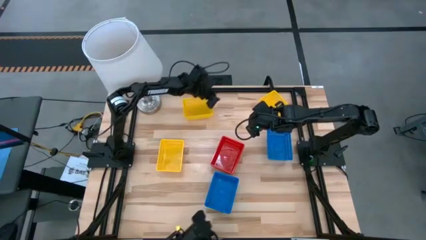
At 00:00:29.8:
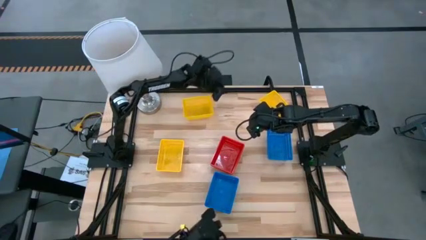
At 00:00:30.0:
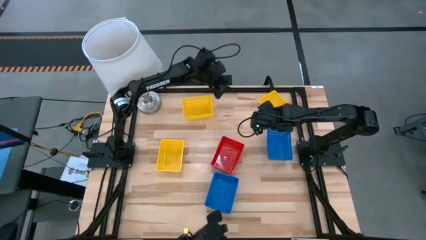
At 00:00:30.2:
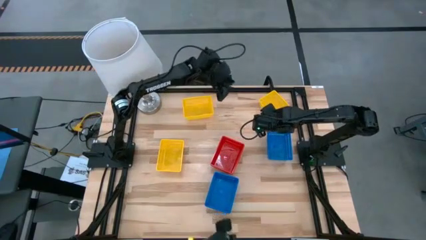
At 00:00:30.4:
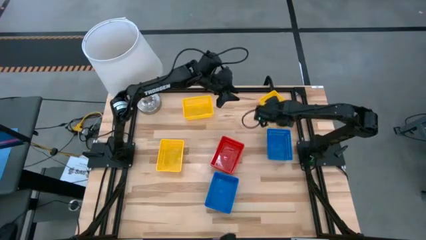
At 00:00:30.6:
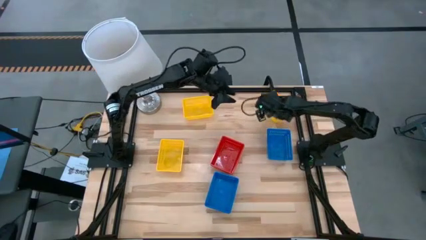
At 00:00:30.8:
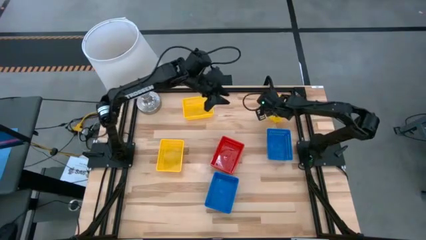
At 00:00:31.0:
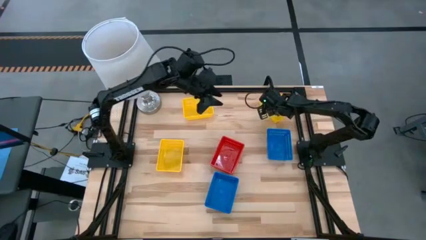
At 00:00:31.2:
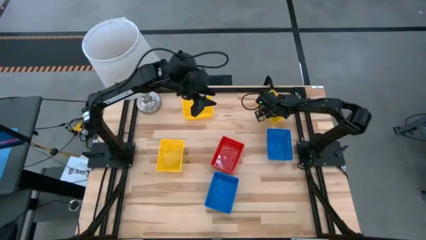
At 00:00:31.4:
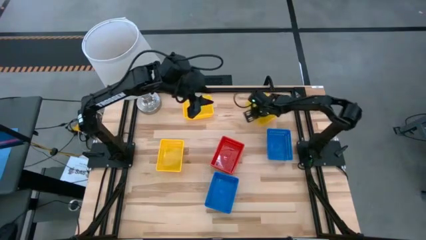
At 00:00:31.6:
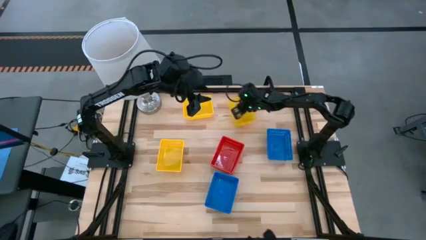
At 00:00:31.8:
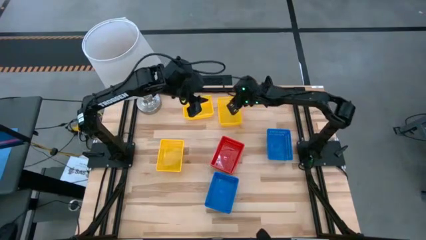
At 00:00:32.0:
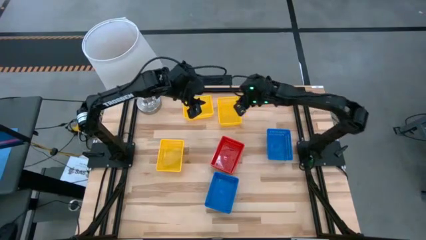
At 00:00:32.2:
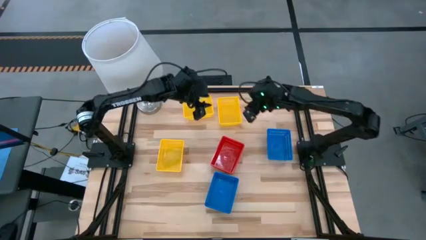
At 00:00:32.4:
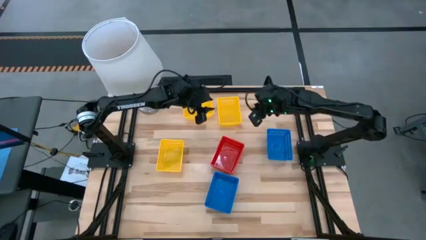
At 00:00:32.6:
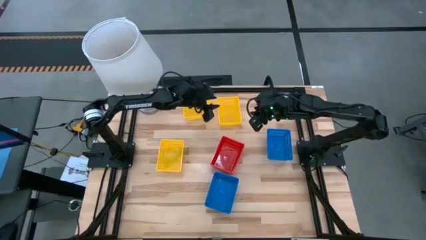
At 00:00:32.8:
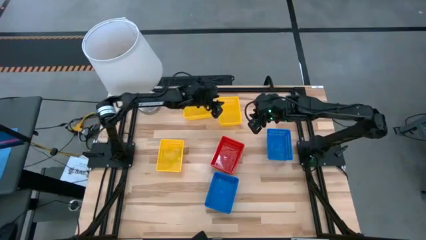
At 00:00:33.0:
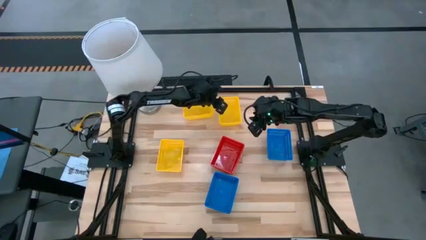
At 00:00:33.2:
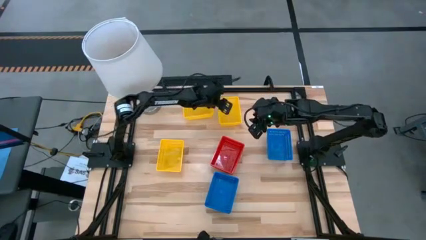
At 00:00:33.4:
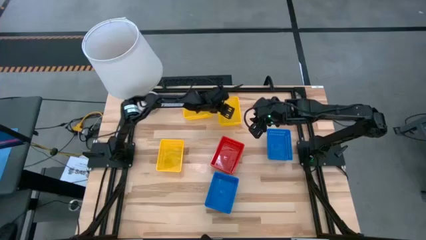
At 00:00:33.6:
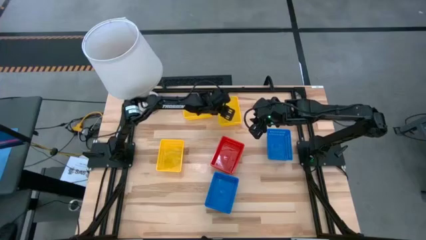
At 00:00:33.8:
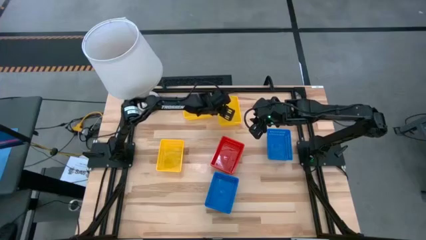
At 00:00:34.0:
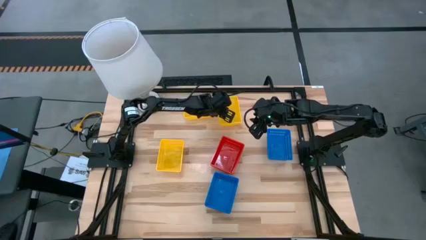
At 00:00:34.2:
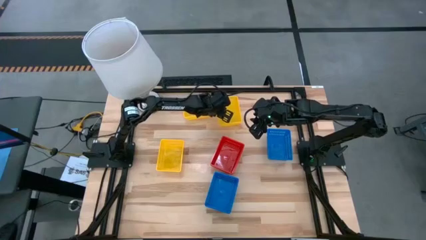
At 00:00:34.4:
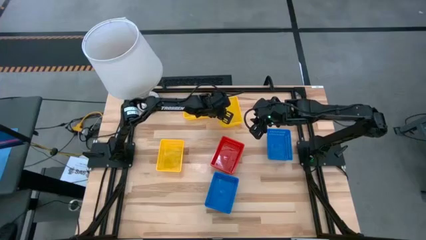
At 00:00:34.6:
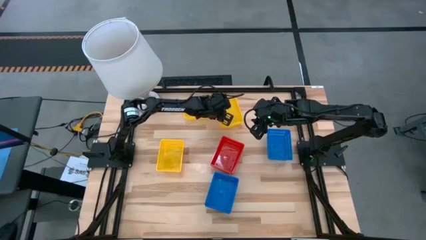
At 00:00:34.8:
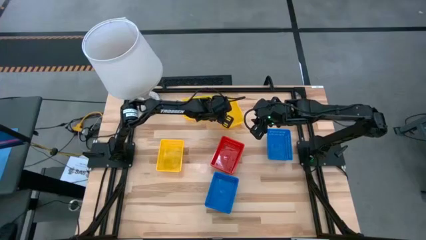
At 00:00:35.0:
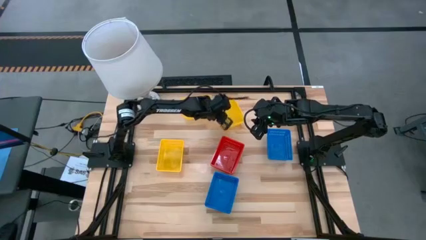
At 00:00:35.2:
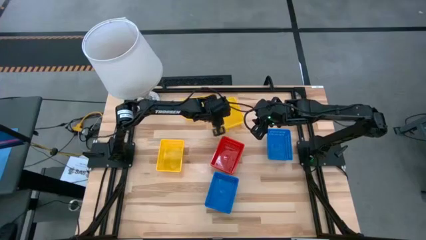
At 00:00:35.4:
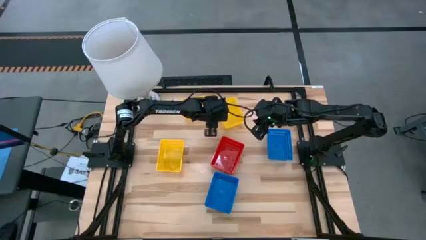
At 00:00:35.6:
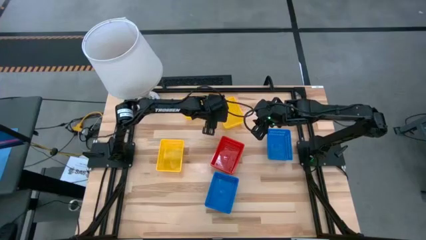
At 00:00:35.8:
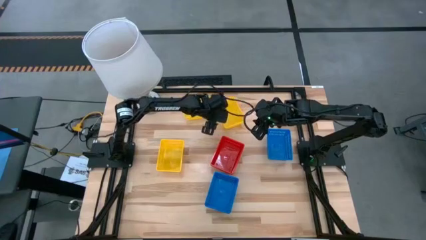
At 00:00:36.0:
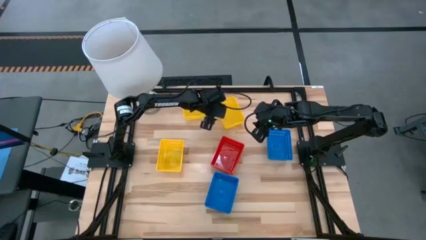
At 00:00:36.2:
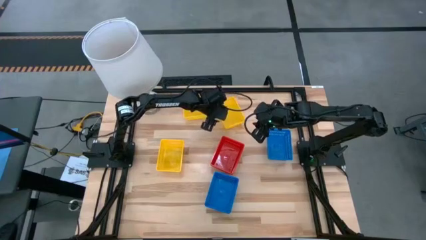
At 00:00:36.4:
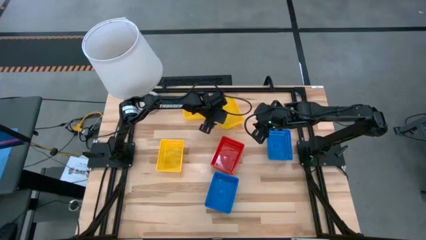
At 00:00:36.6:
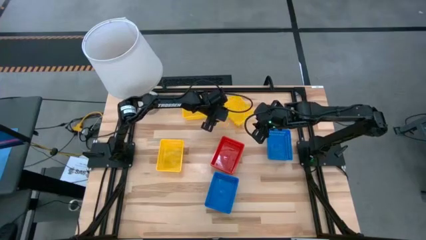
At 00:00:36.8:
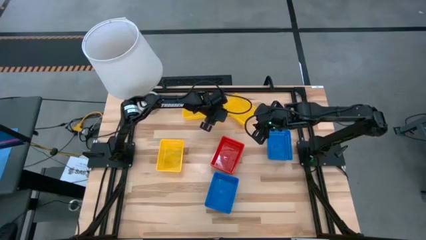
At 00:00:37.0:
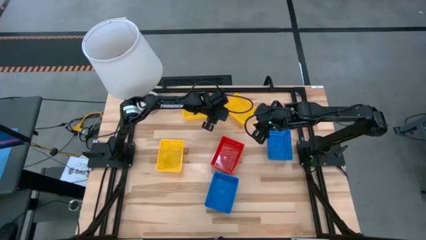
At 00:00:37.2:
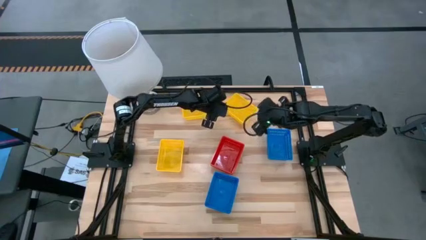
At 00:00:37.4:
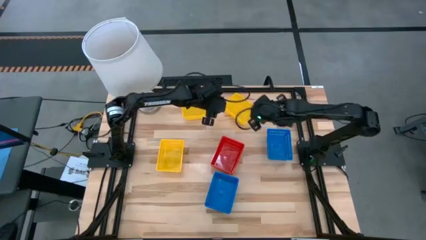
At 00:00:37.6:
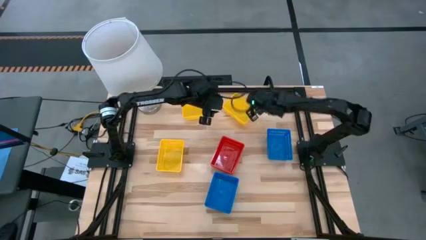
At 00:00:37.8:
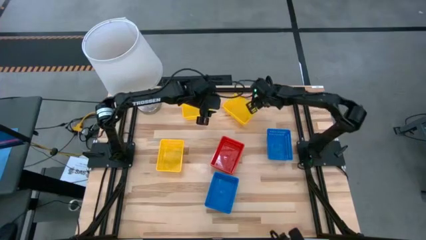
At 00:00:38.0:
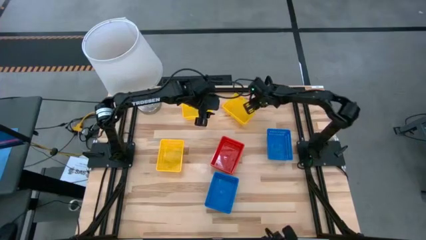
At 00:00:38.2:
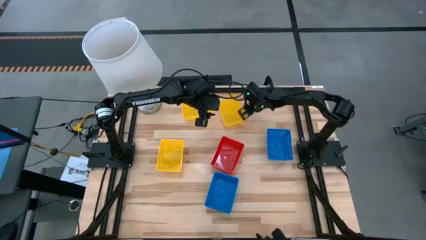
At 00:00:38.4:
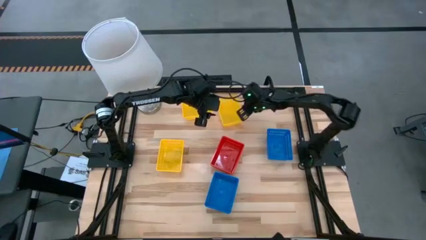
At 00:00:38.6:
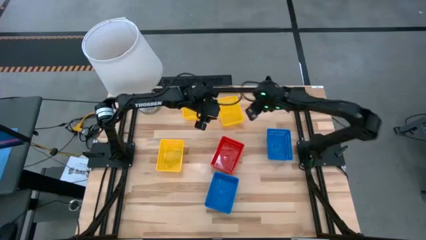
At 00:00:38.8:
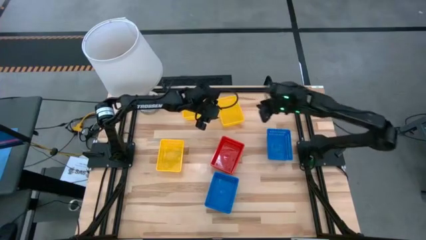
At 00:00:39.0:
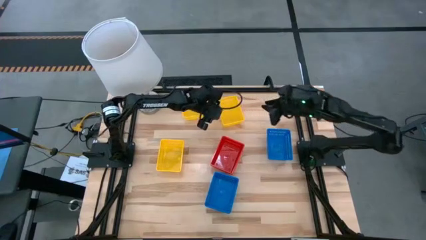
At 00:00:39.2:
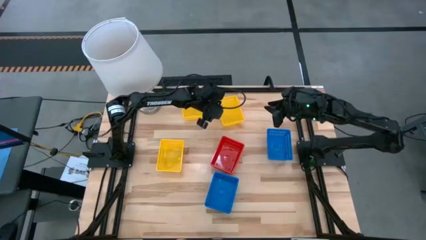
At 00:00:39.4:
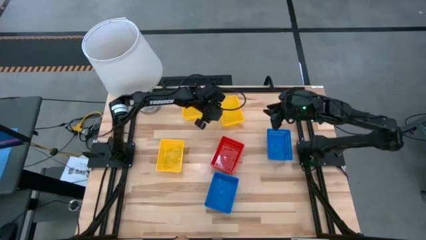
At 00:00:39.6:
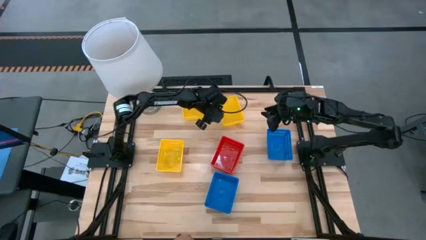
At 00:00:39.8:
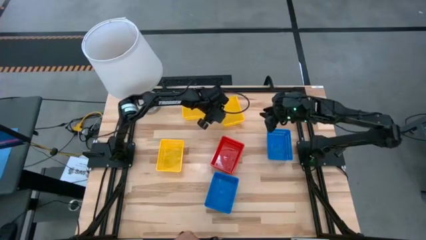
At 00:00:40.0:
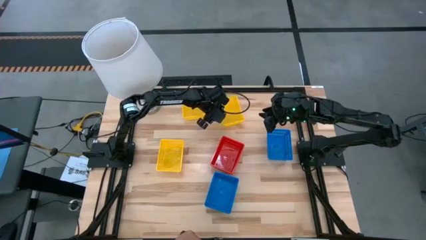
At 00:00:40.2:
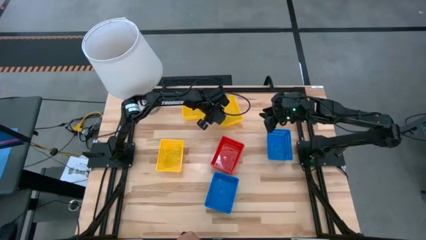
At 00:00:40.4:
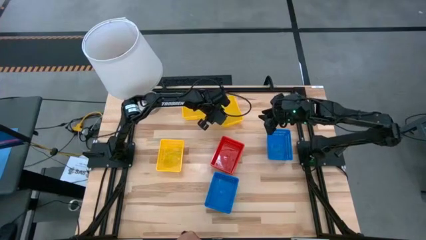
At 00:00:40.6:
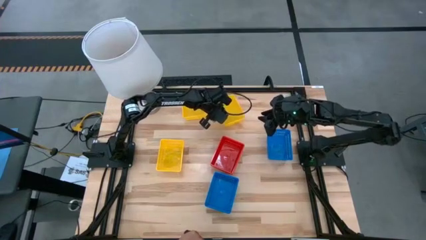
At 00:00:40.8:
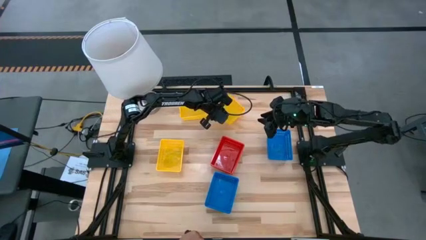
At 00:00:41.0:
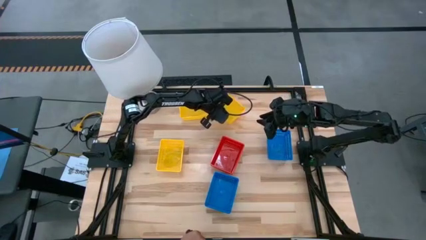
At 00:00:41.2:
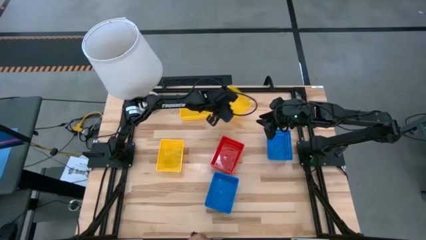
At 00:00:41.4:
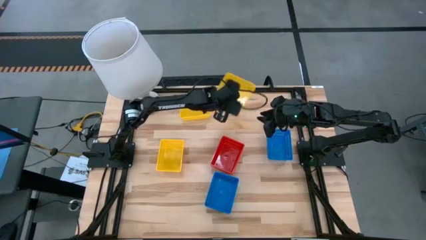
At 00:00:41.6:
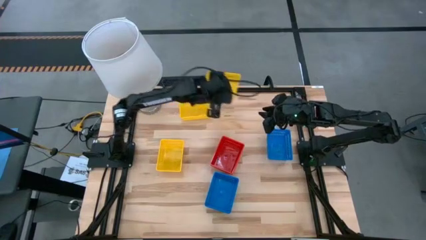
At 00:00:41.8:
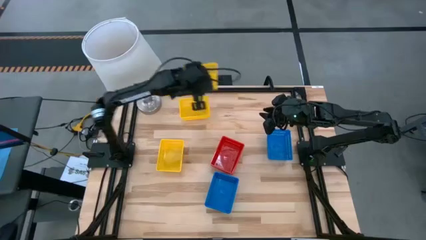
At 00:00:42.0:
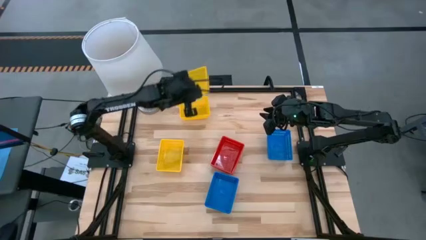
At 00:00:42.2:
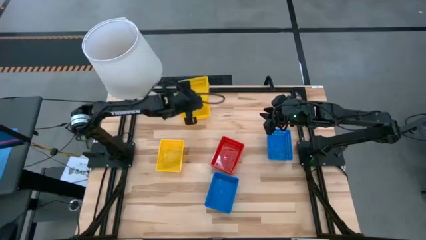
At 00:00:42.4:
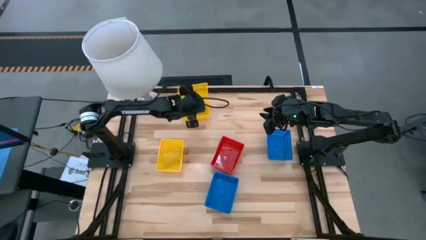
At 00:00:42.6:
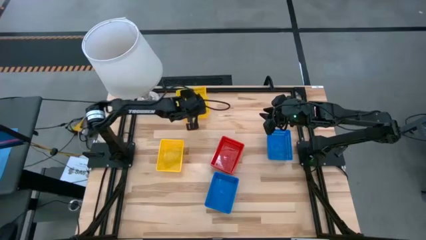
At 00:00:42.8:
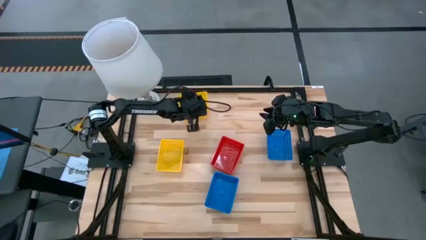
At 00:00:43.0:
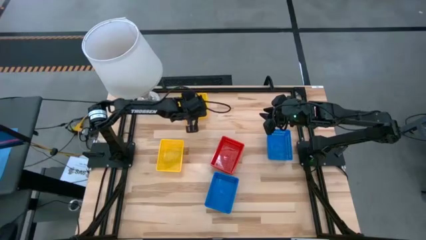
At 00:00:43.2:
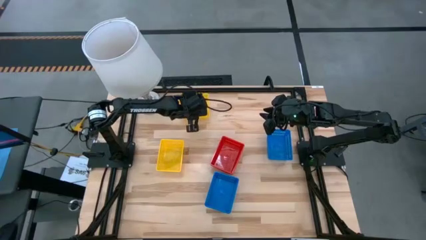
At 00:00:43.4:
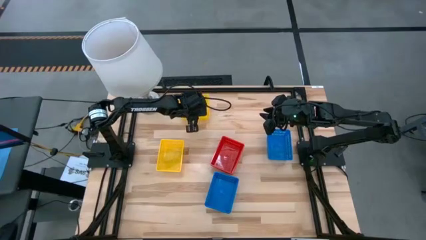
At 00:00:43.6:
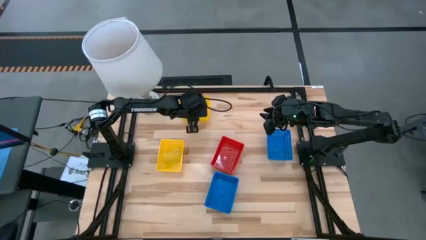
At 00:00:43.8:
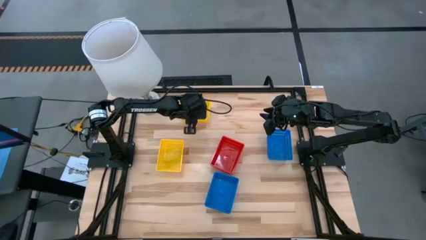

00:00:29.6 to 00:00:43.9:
Stack the top right yellow basket on top of the top left yellow basket

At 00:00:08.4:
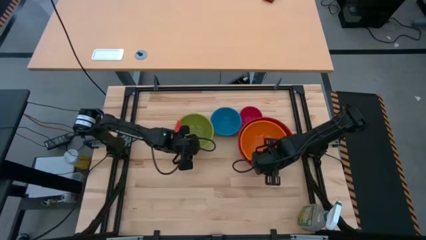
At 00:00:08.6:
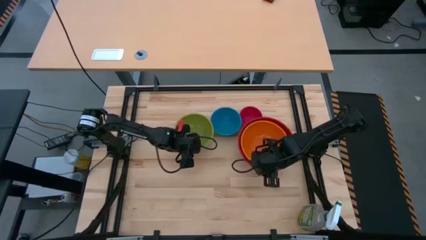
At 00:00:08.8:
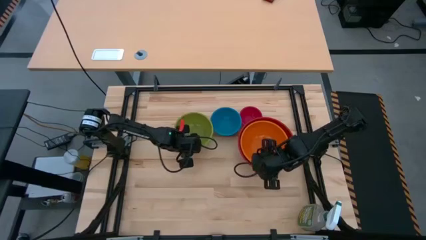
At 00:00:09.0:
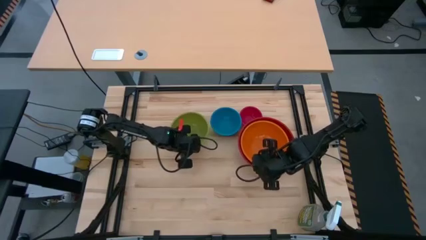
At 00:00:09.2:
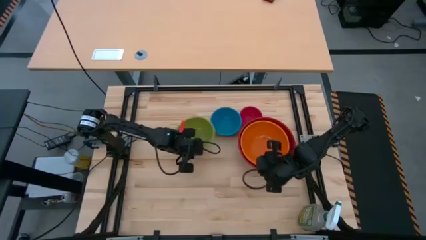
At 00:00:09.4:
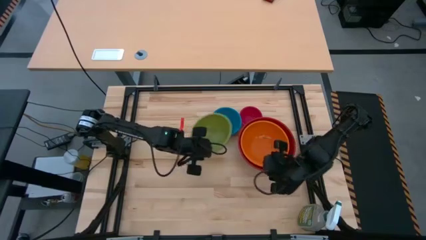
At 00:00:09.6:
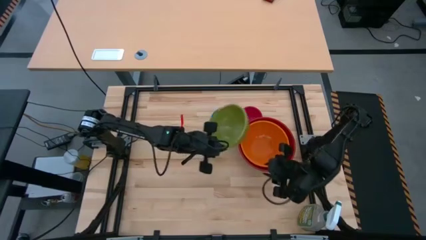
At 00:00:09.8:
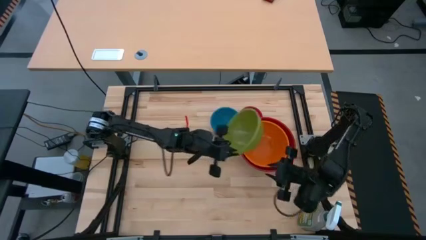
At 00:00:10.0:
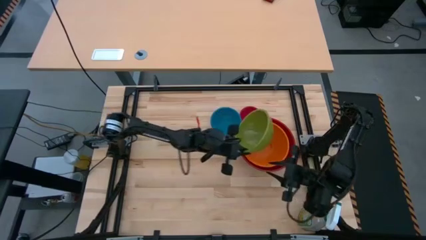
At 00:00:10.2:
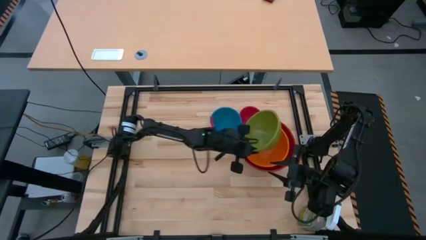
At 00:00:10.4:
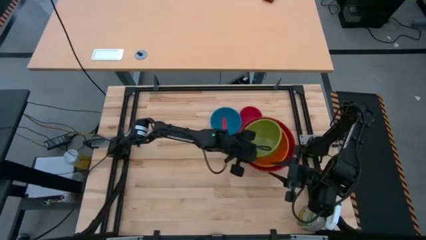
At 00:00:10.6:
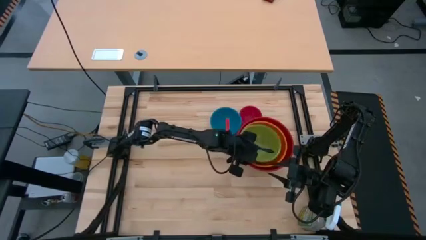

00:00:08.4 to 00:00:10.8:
Stack the green bowl into the orange bowl

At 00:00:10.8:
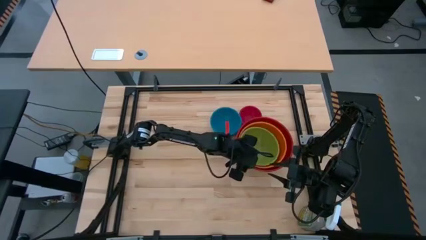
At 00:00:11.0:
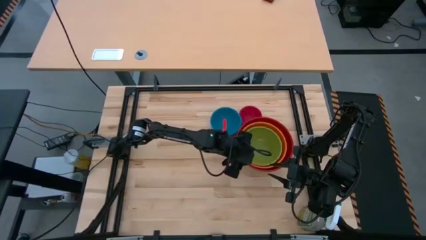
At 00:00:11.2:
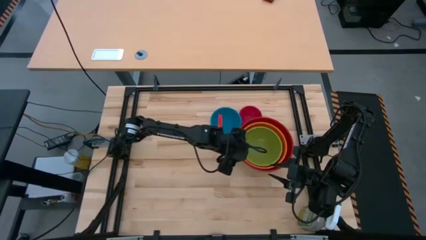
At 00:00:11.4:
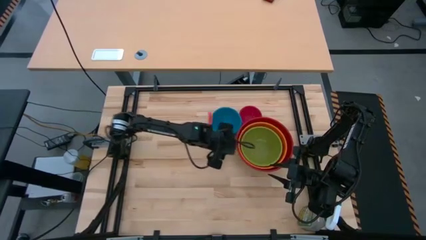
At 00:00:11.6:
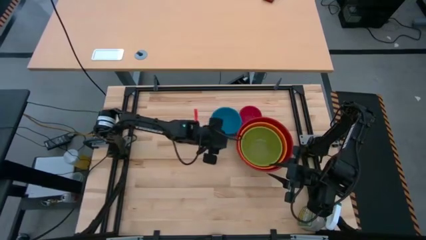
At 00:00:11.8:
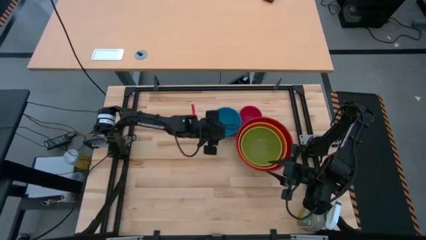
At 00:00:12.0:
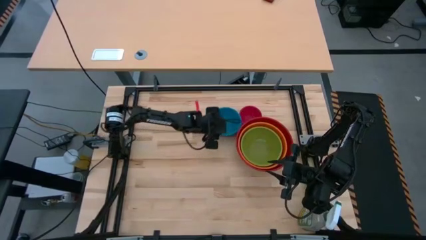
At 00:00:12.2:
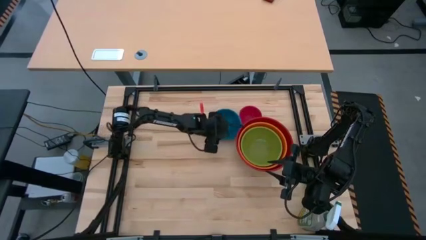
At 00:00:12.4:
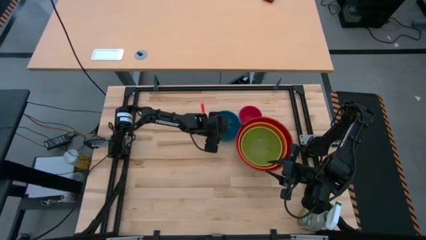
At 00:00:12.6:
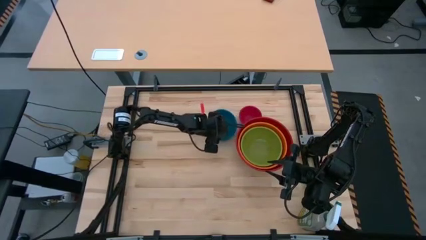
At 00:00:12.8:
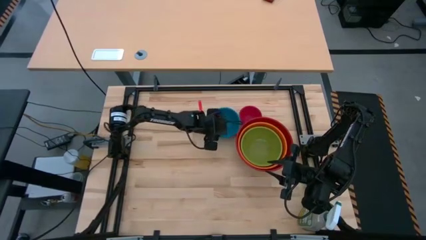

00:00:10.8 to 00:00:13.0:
Stack the blue bowl into the green bowl
